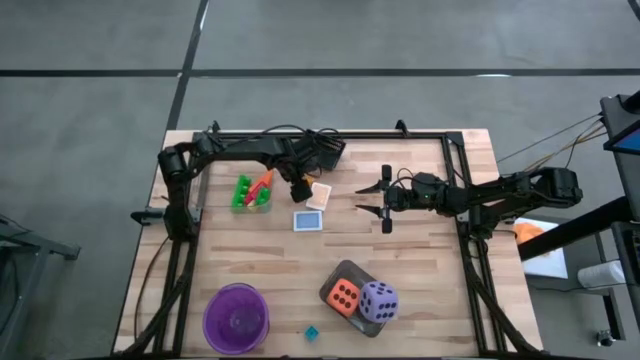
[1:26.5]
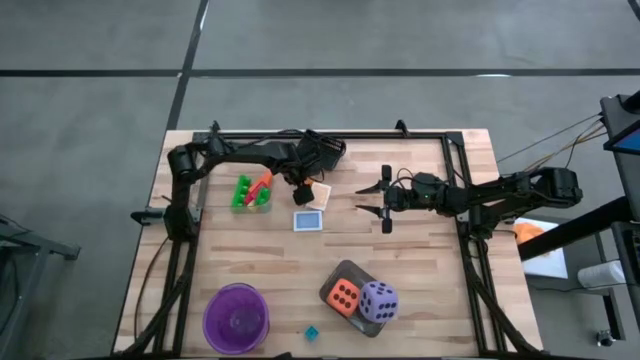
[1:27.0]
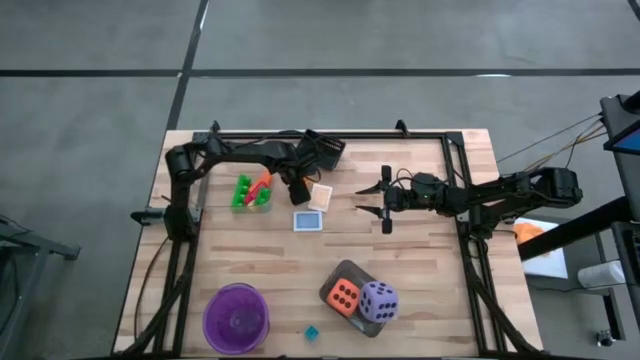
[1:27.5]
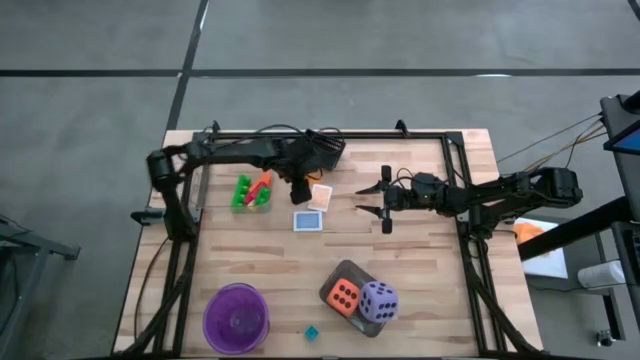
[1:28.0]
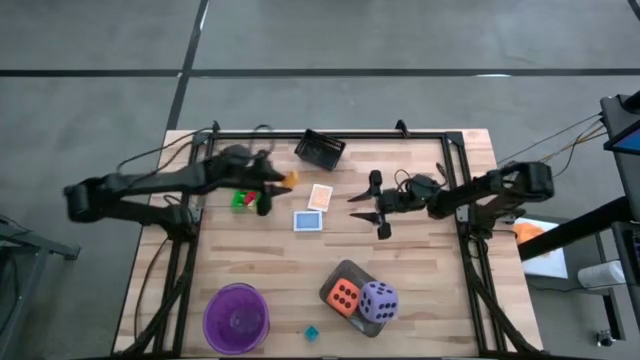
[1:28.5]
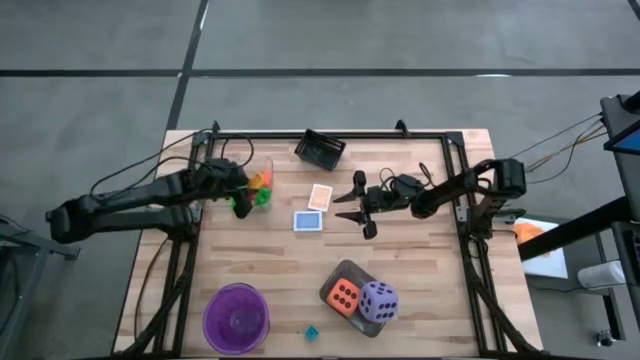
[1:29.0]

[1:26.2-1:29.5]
Task: Pick & Place Toys
Put the yellow game piece into the transparent bin

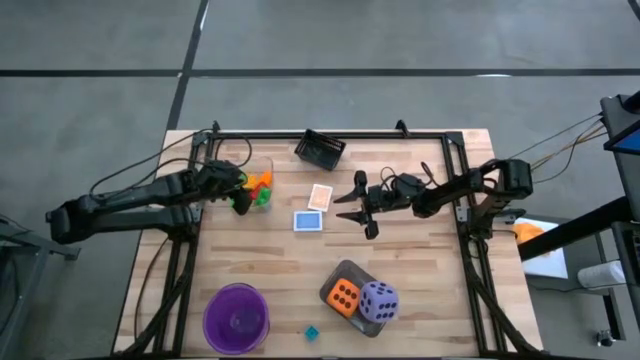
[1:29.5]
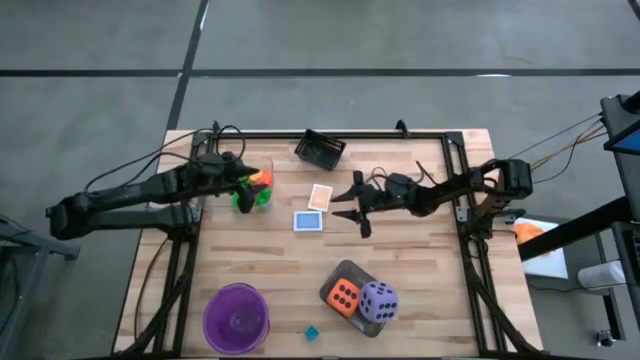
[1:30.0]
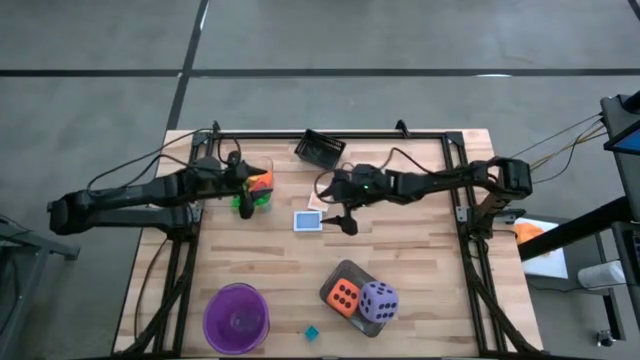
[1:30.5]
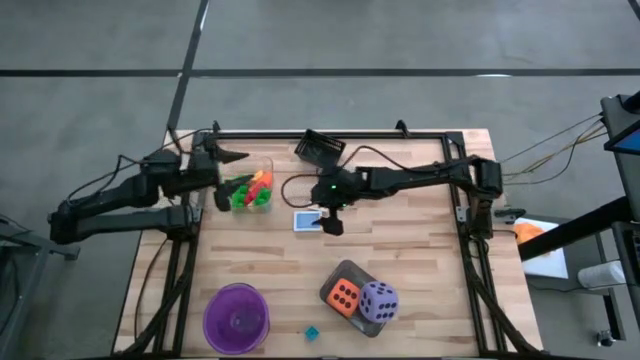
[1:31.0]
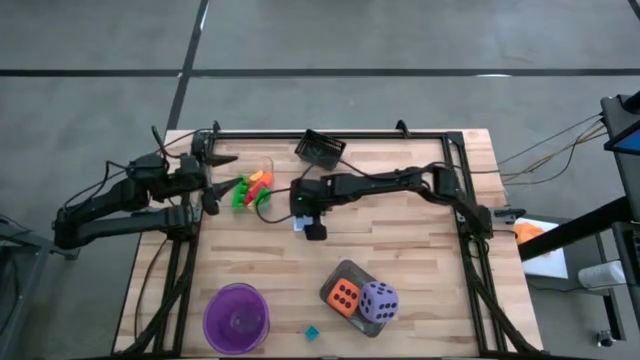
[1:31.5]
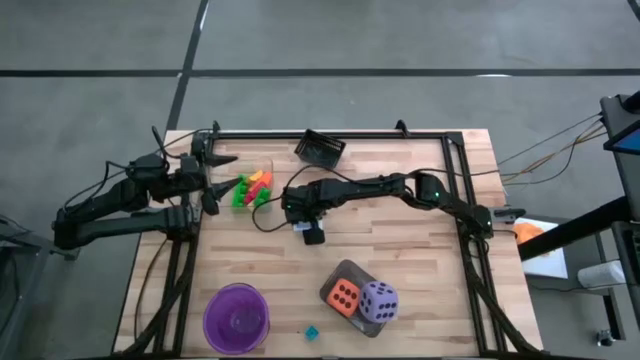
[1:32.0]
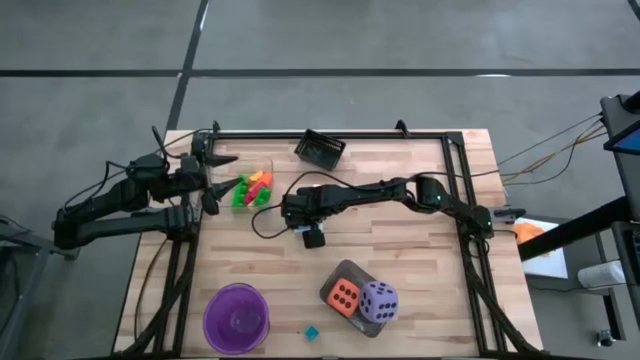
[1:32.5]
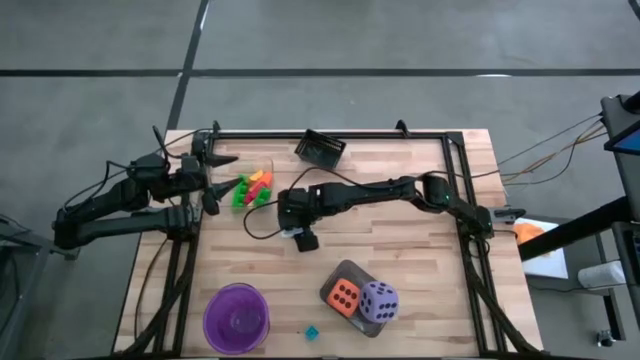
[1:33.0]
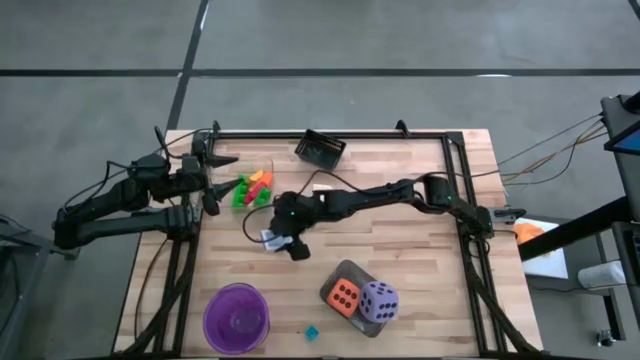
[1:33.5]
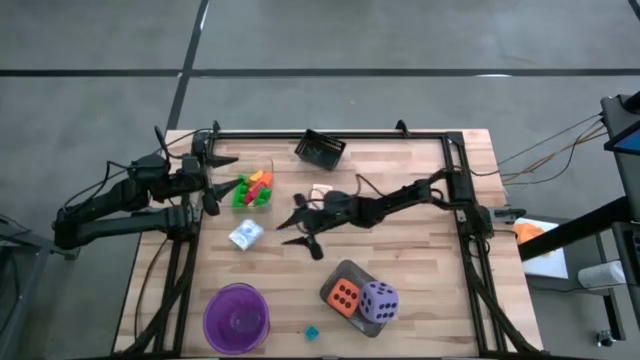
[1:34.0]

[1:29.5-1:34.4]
Put the blue playing card box into the black bin

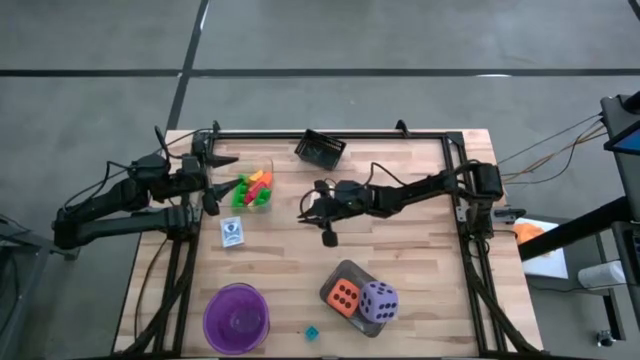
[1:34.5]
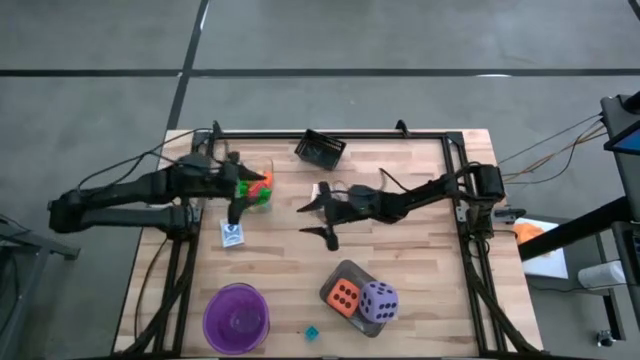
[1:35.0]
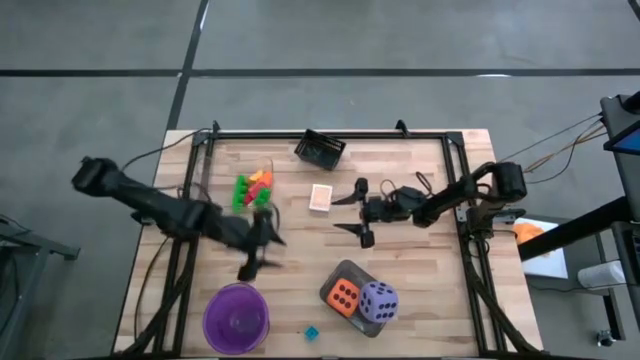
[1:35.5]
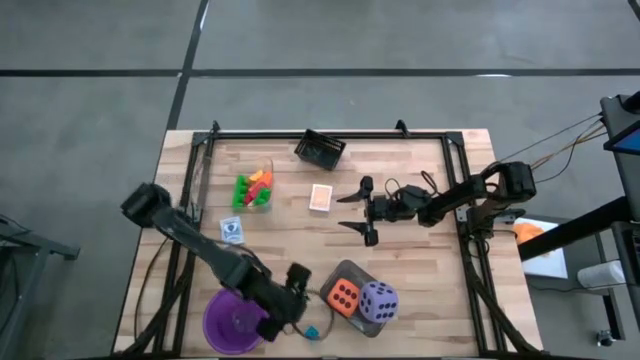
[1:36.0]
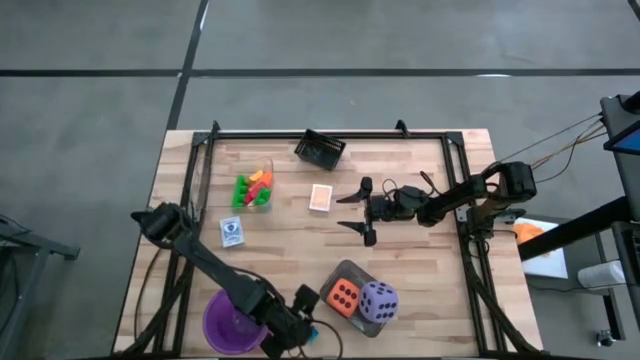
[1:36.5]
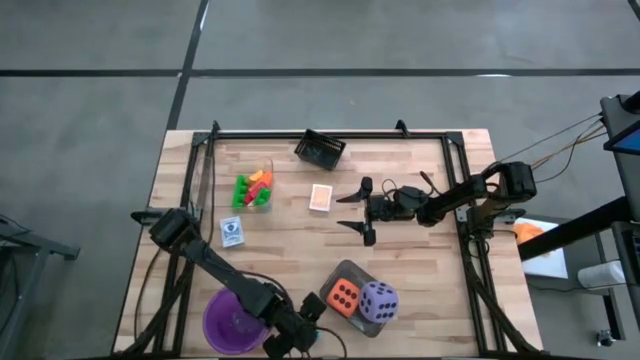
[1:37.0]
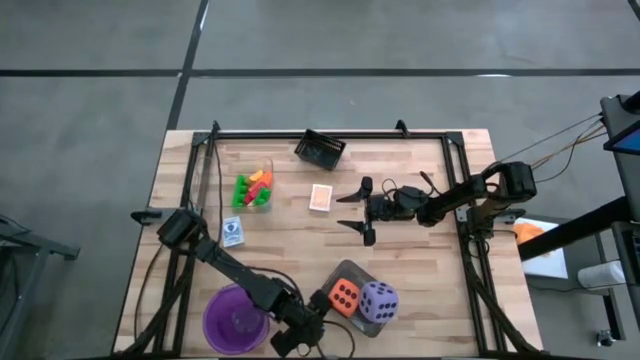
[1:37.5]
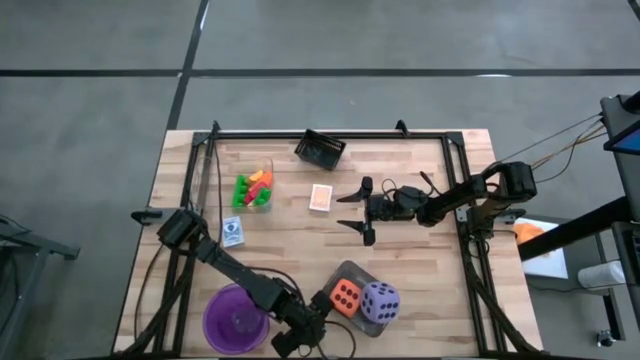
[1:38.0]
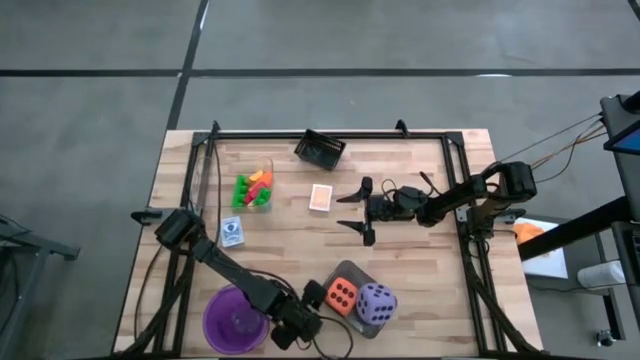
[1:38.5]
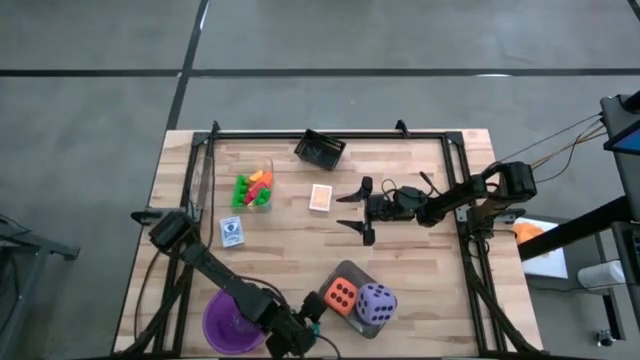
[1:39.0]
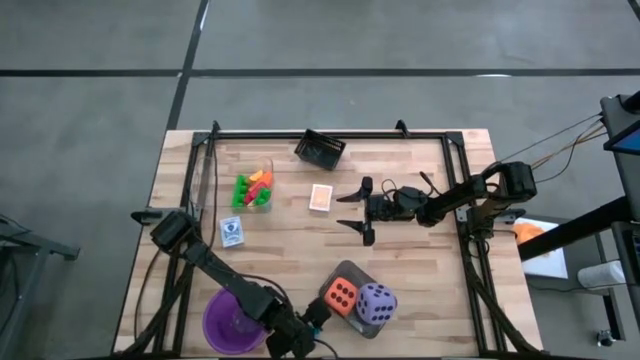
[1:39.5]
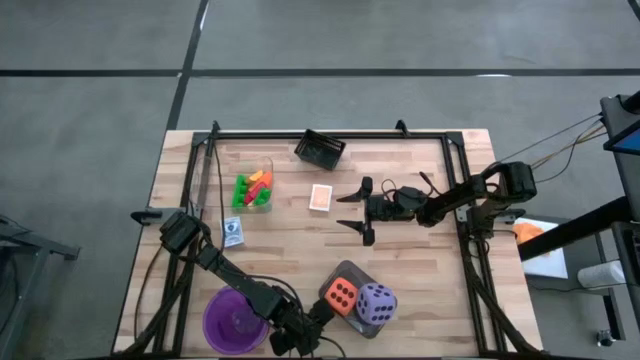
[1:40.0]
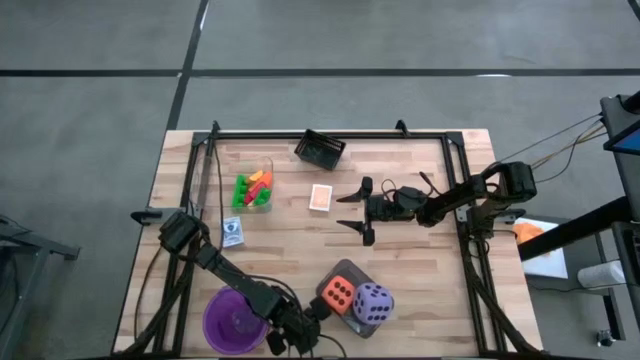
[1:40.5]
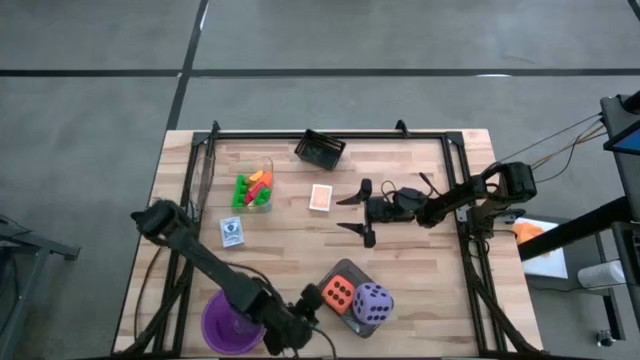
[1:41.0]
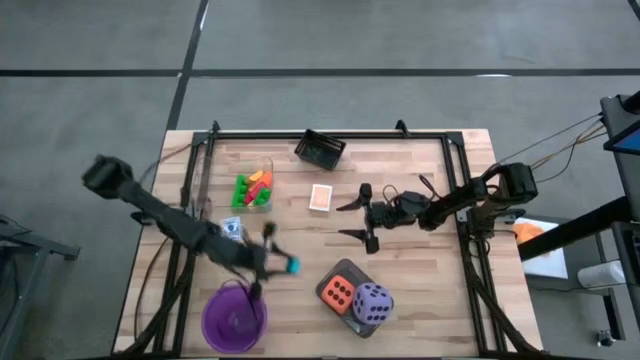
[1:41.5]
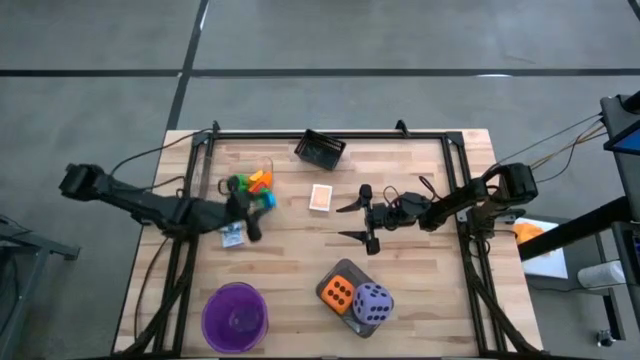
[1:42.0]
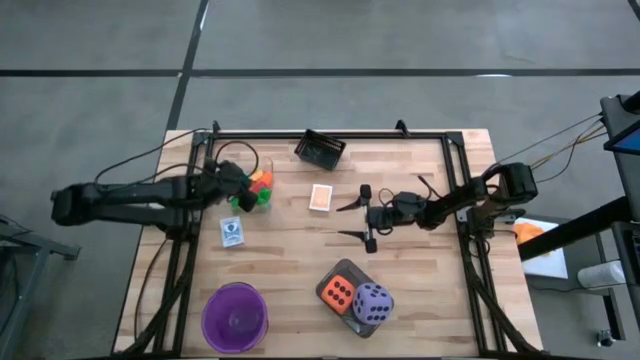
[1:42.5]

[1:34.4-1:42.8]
Put the blue game piece into the transparent bin

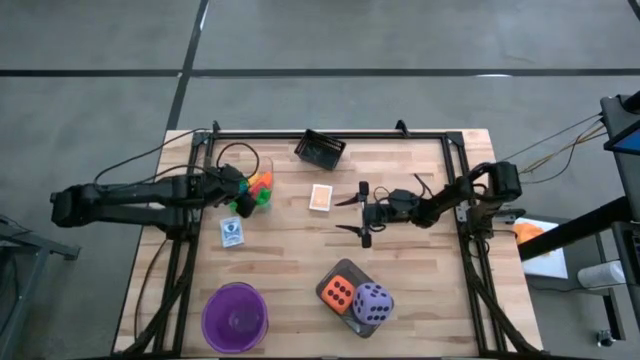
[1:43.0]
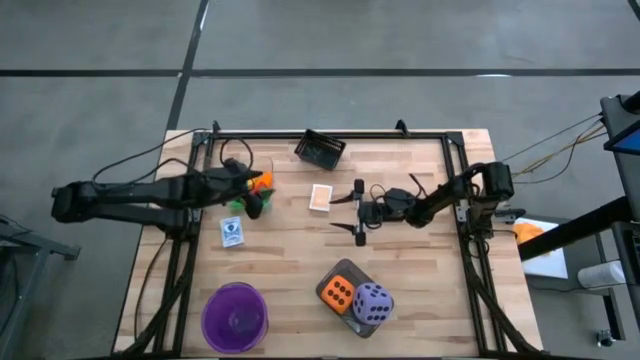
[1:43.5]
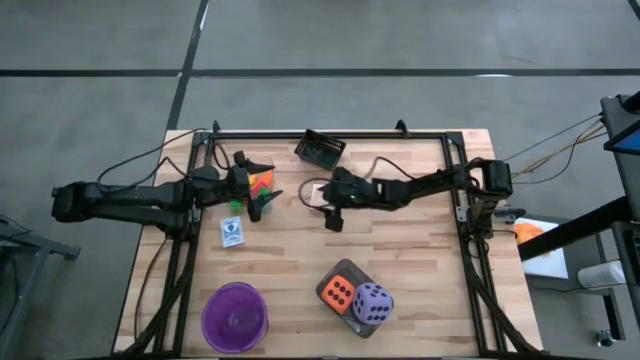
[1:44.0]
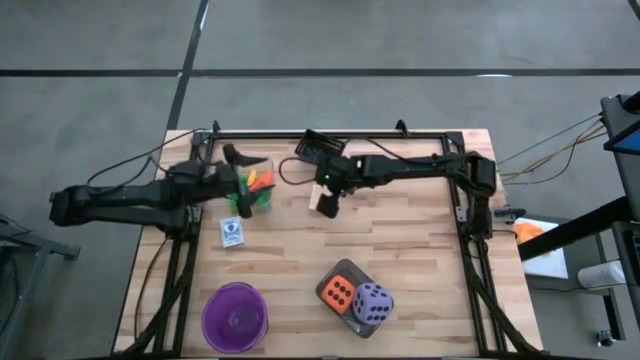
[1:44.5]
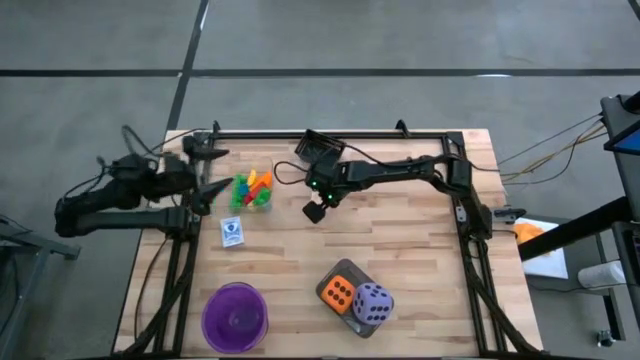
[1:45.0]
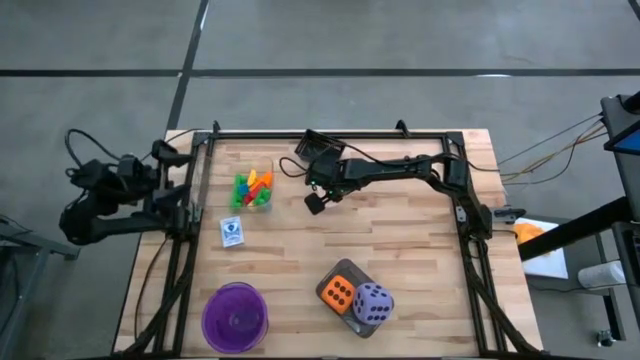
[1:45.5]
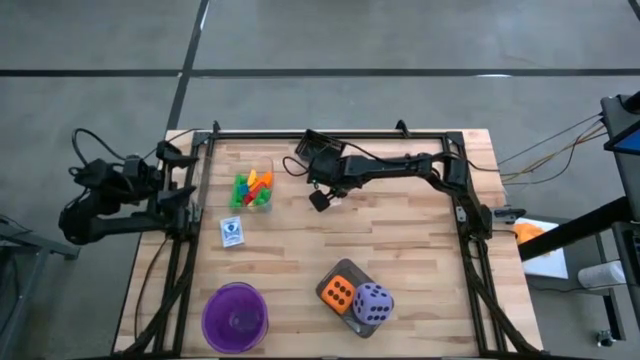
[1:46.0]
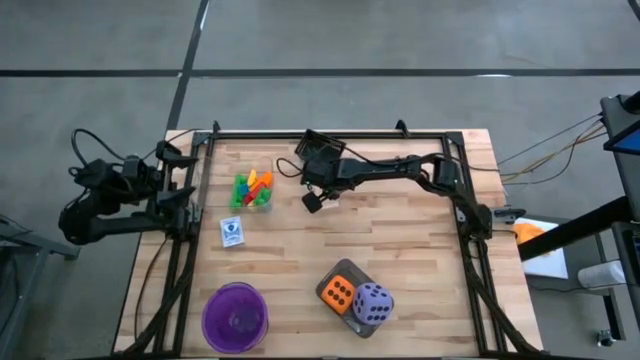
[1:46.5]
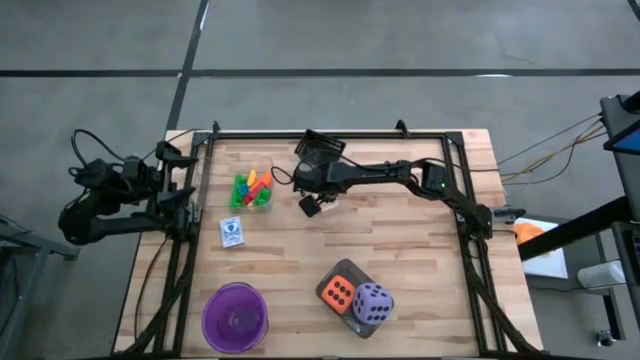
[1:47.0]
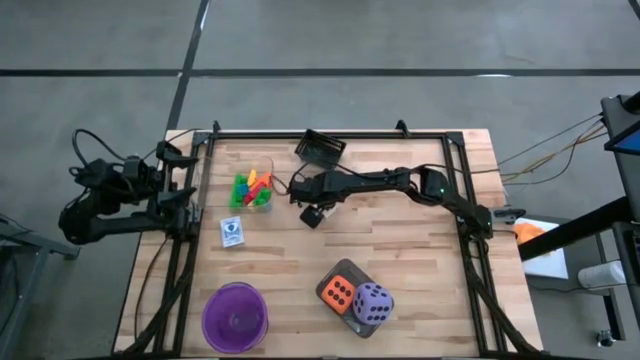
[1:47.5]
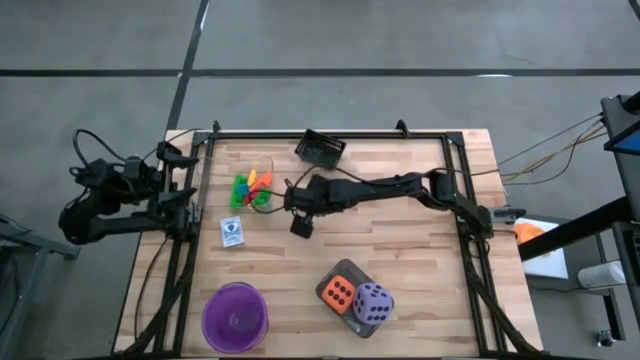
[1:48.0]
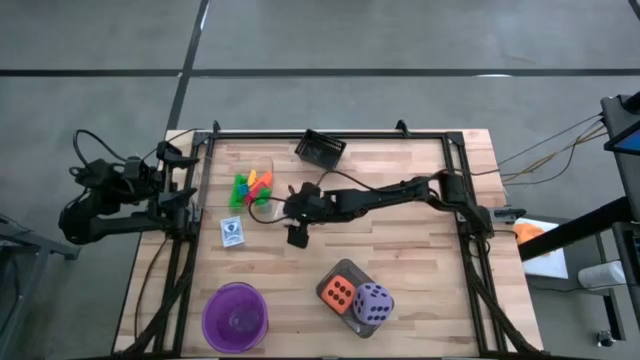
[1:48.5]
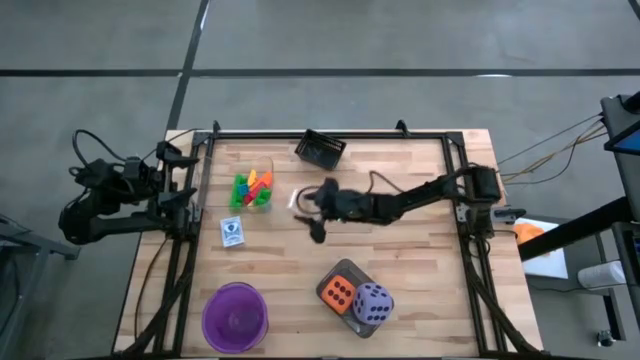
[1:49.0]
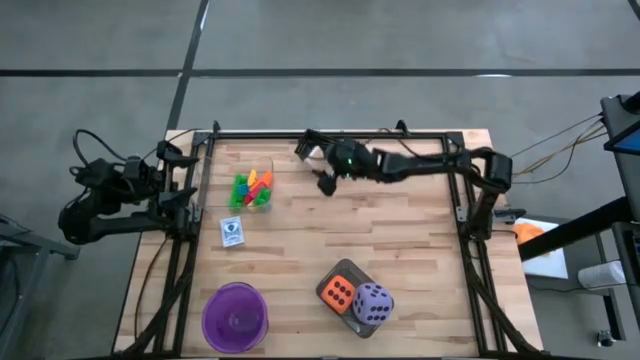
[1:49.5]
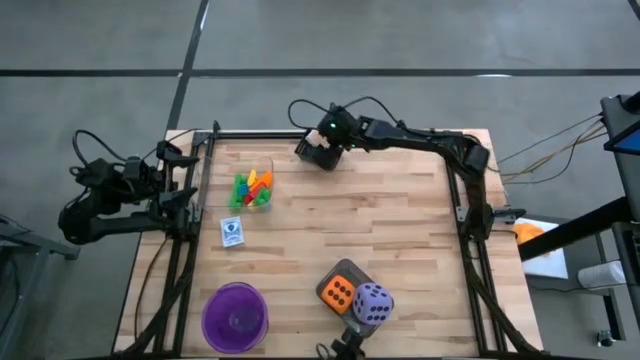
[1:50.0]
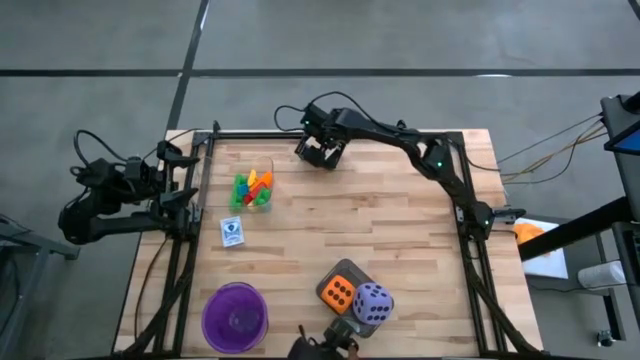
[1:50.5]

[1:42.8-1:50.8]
Put the yellow playing card box into the black bin
